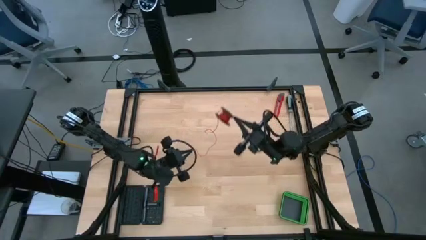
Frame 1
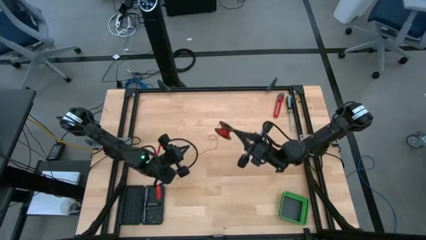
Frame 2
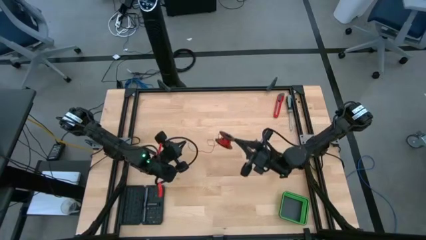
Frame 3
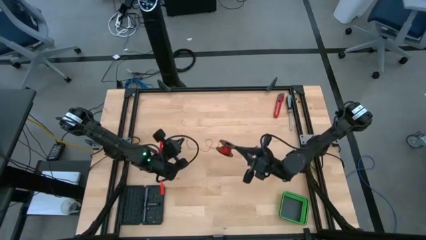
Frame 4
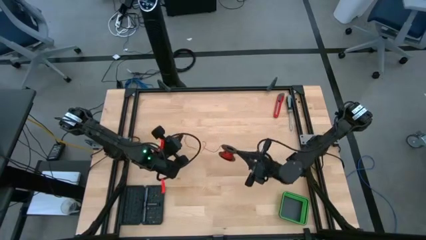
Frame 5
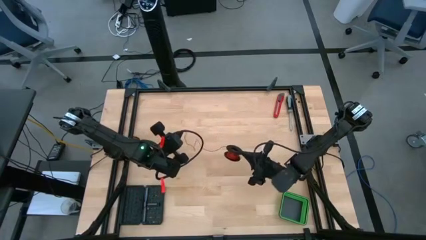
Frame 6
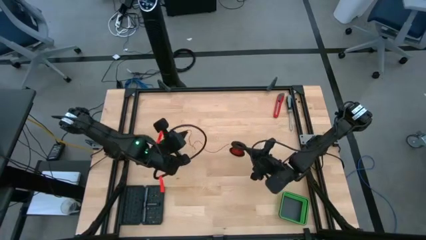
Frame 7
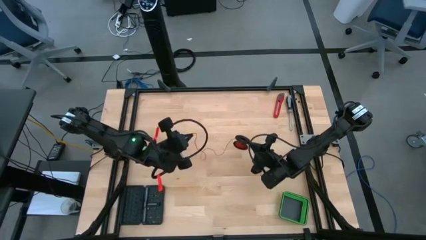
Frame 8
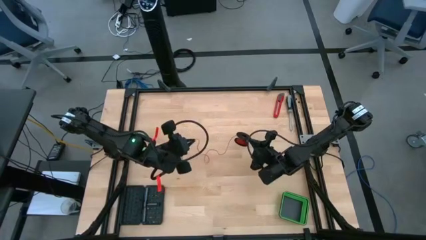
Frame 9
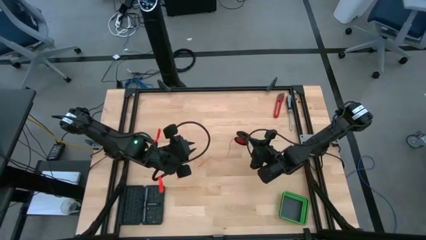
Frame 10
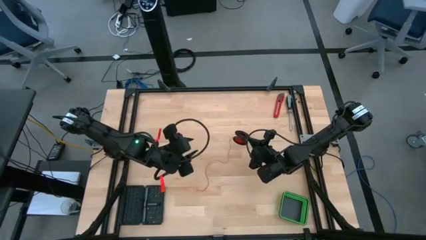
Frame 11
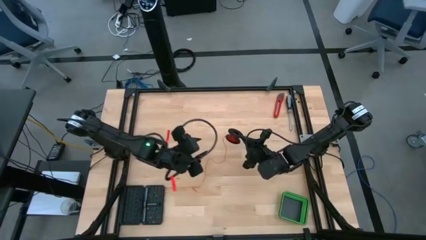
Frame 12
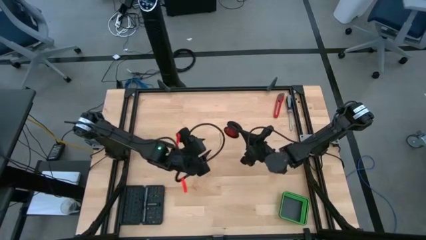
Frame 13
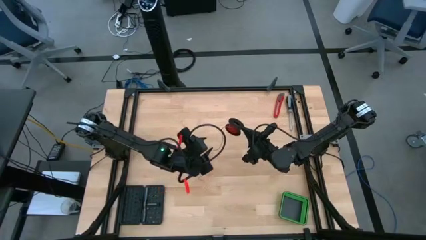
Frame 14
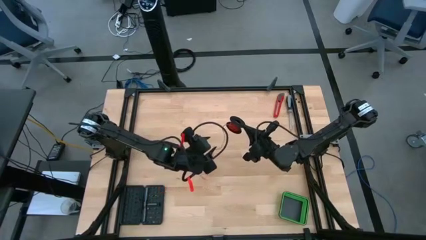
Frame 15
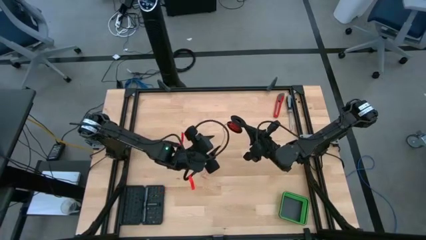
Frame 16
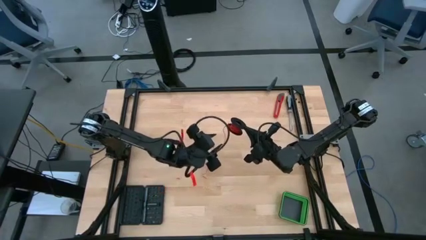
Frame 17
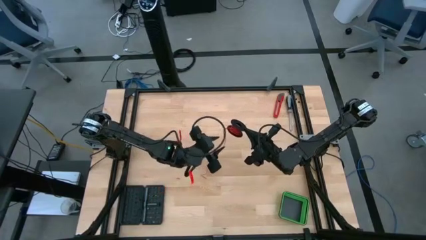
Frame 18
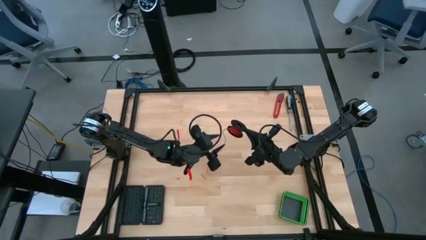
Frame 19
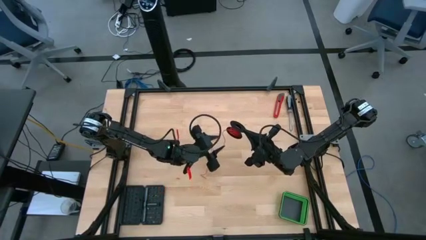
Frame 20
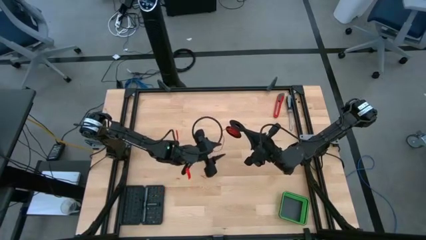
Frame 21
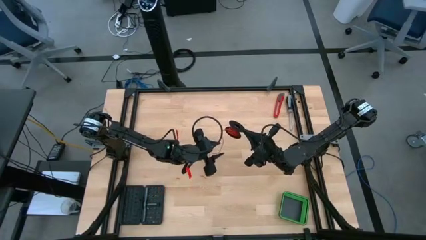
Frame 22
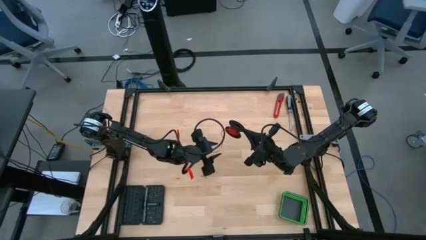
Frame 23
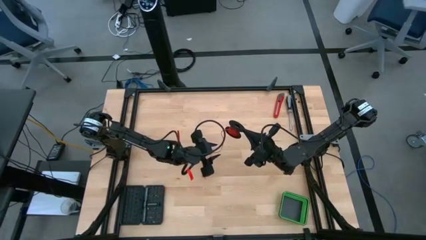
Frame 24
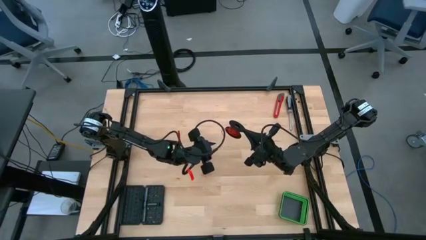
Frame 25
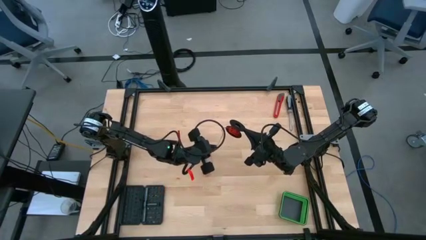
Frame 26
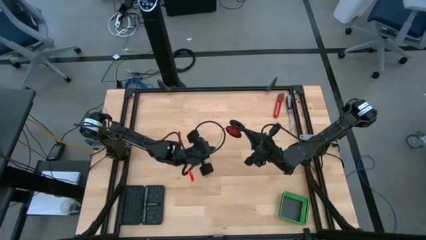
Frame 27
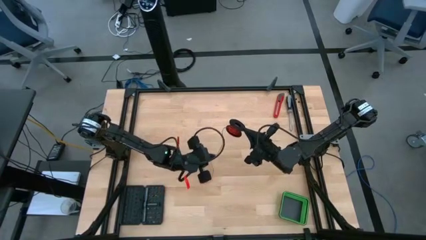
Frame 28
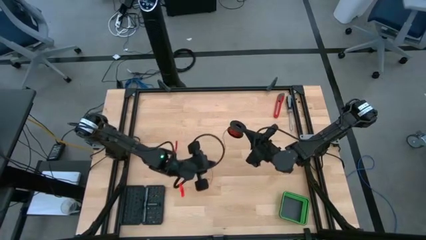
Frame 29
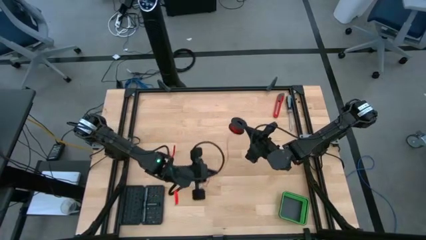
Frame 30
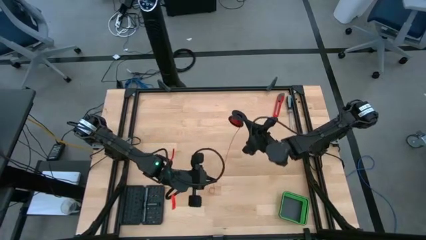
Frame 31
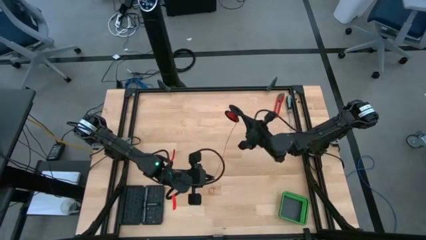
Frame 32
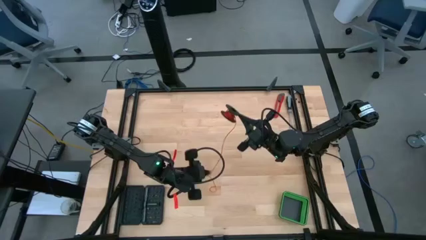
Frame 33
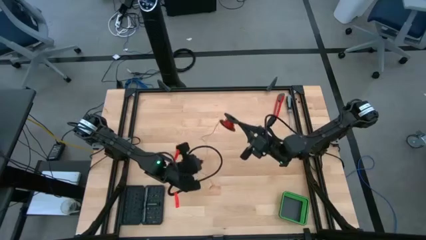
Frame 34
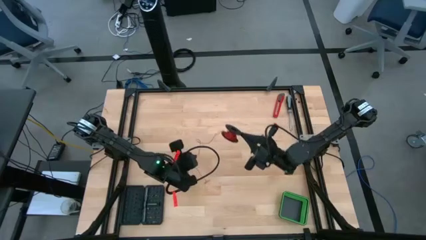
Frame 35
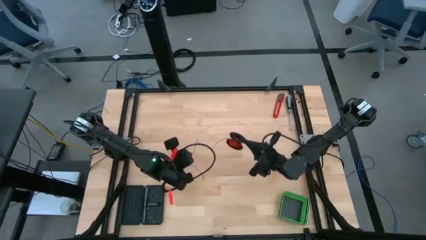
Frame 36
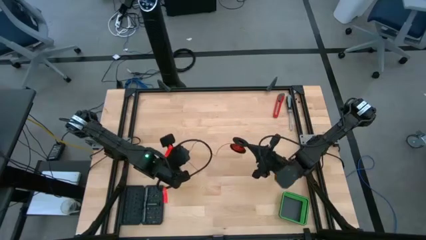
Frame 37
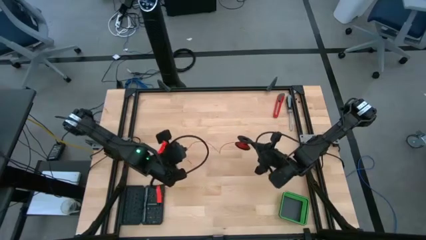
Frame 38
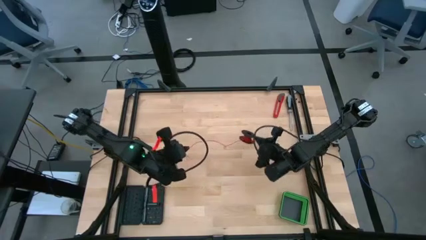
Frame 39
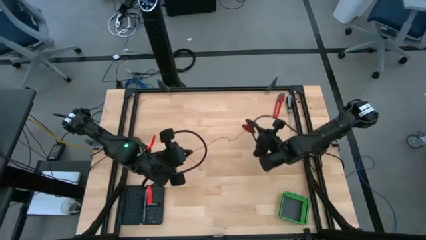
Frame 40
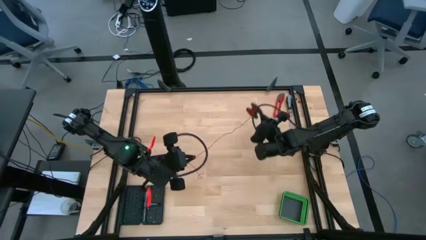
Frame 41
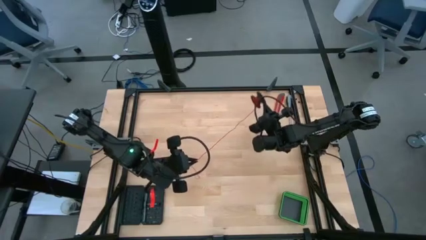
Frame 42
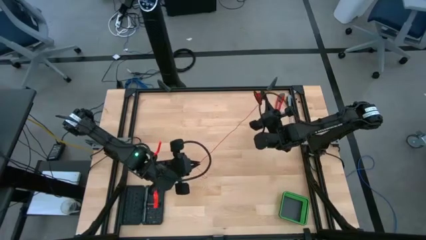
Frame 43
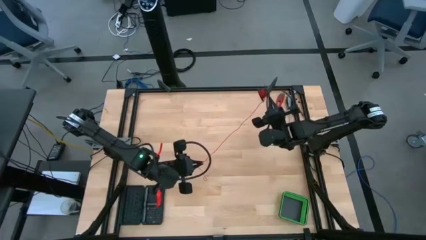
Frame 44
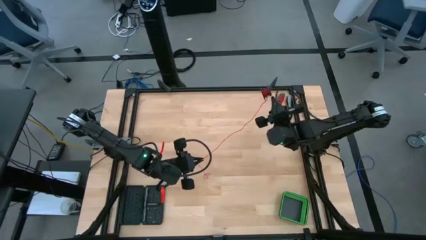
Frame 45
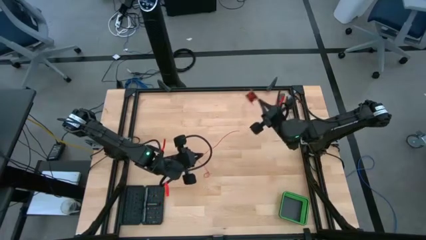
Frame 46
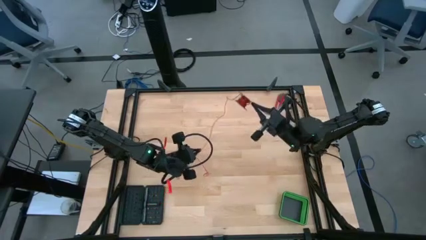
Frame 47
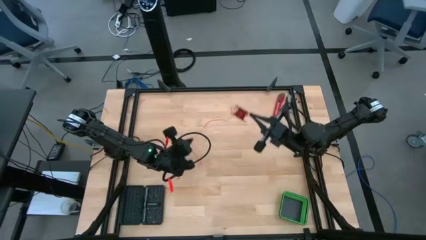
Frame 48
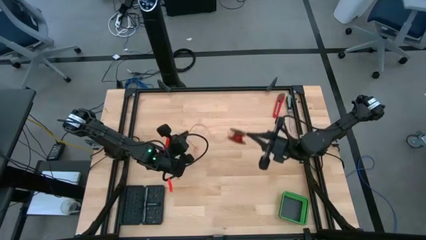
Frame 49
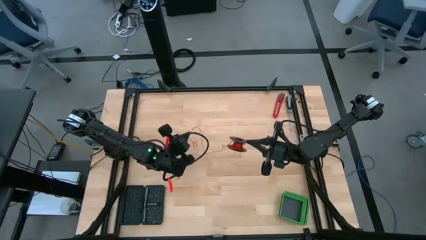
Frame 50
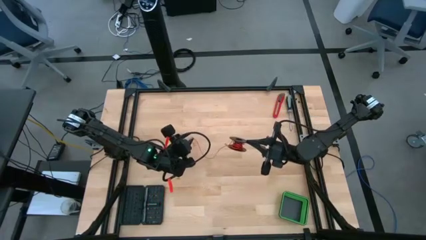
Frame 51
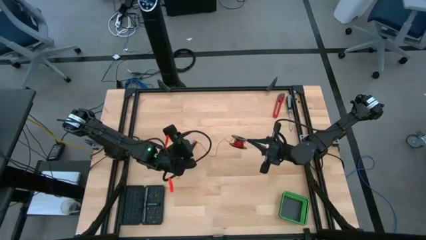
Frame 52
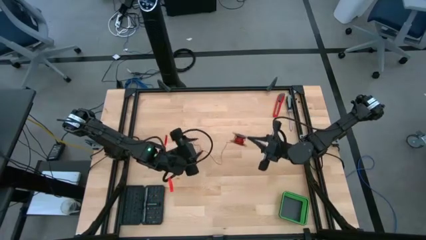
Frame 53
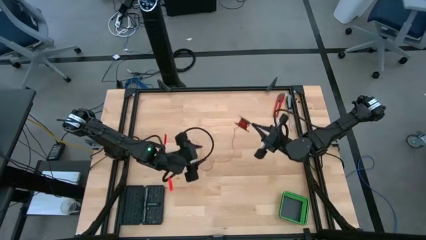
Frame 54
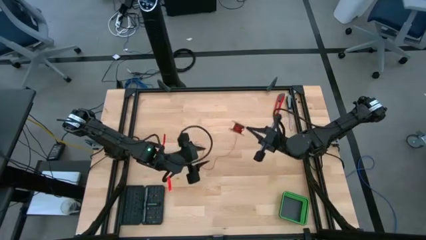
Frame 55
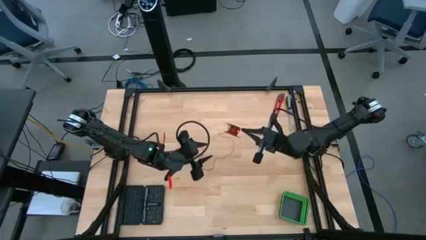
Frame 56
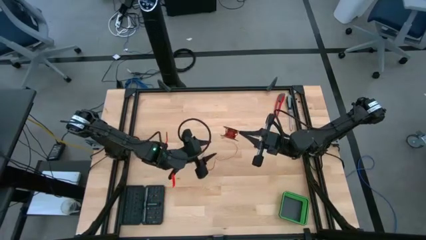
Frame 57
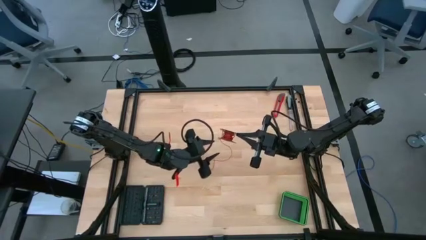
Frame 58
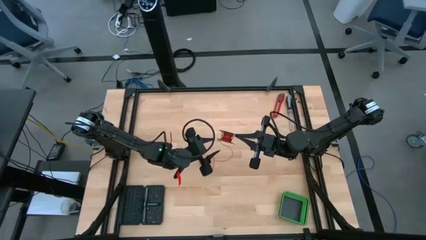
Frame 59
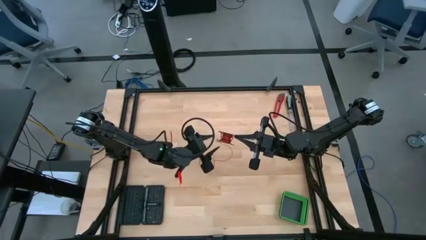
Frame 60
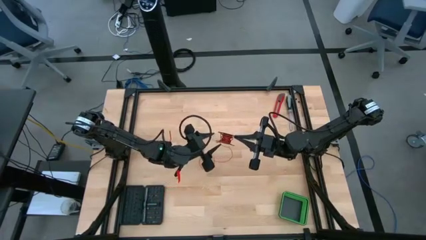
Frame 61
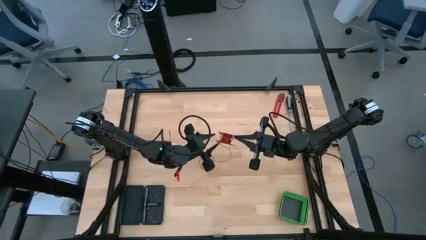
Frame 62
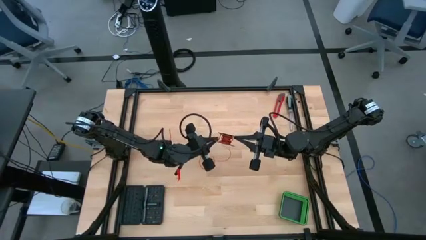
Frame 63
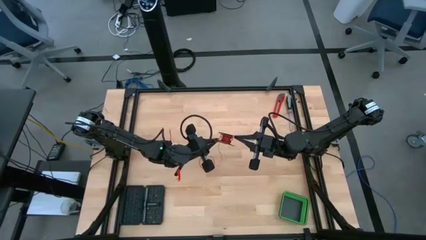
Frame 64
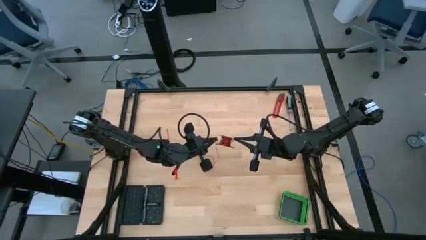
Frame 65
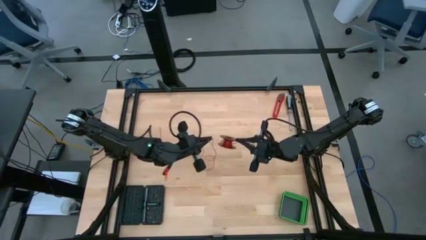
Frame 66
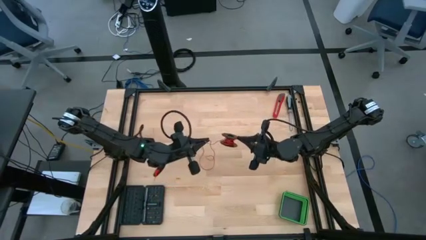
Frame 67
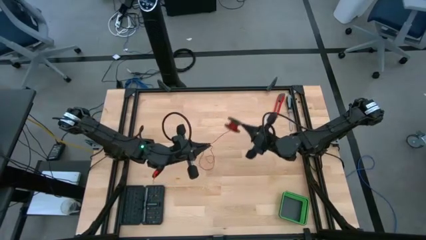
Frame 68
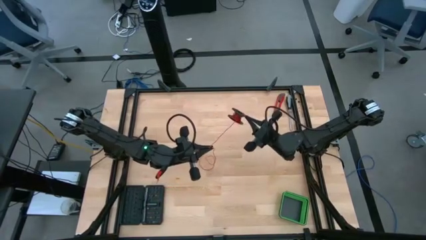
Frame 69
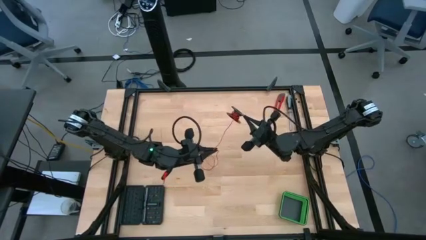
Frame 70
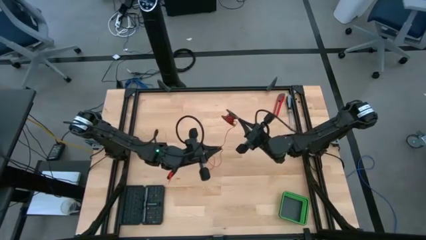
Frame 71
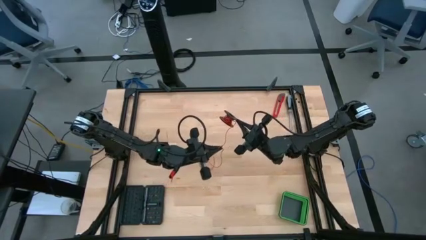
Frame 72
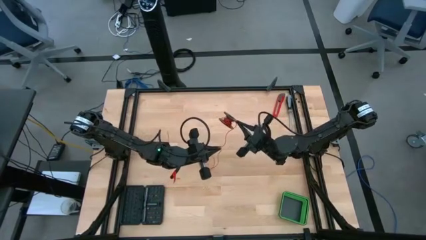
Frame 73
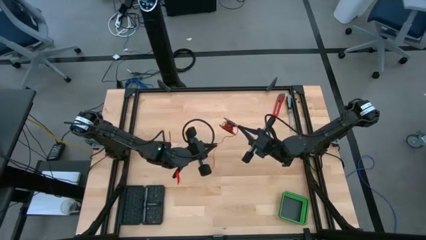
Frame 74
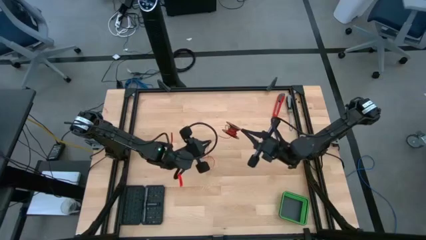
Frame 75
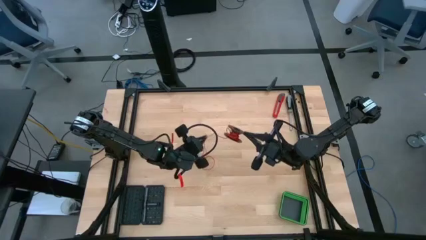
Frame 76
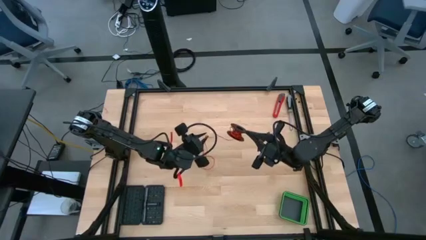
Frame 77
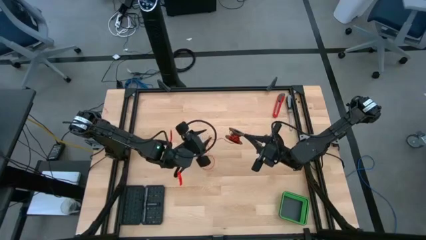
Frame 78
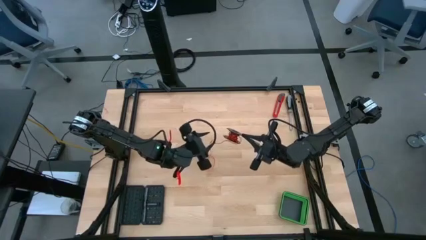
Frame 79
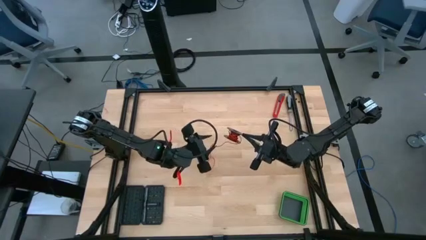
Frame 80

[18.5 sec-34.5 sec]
Task: Coil cords
Uncoil the red wire from the black spool
